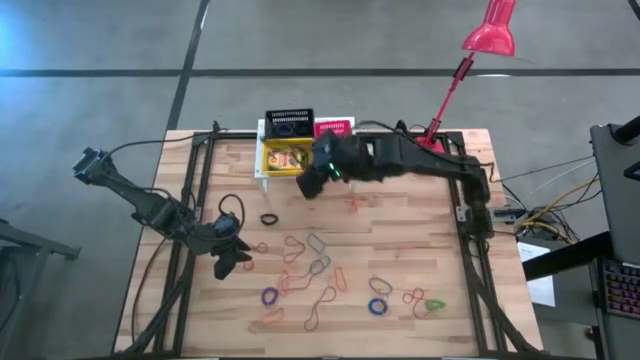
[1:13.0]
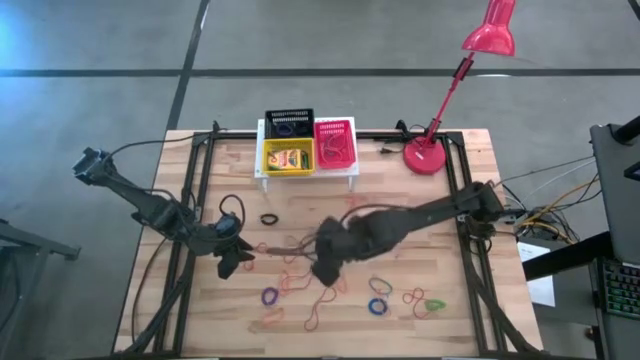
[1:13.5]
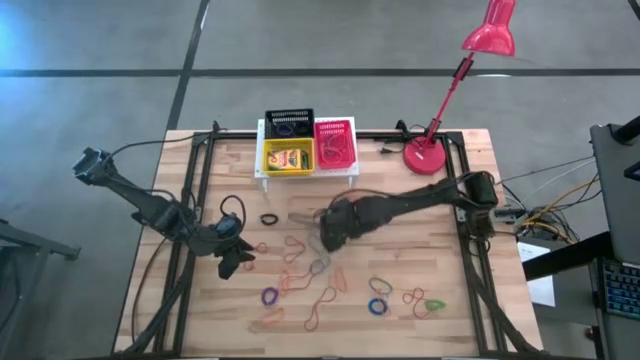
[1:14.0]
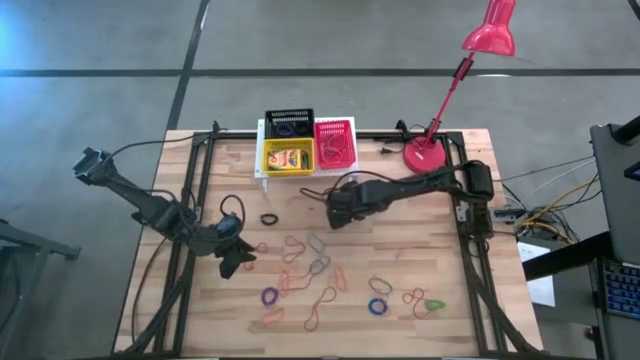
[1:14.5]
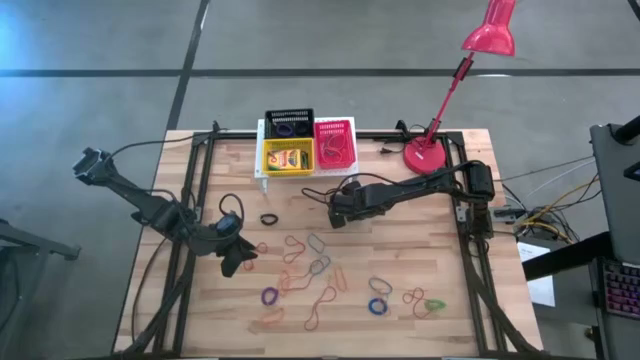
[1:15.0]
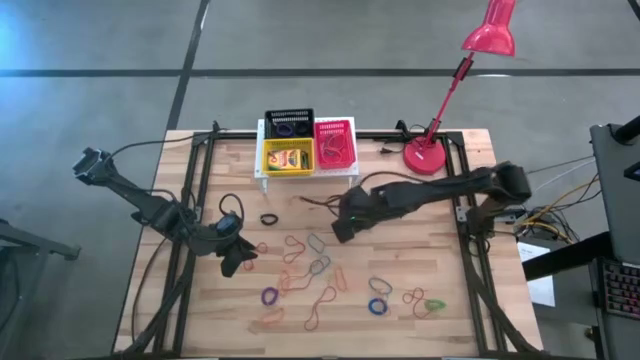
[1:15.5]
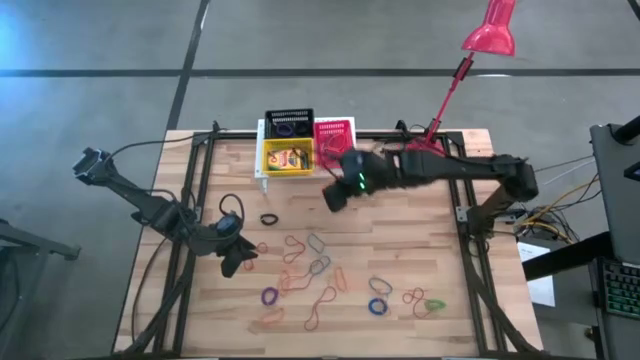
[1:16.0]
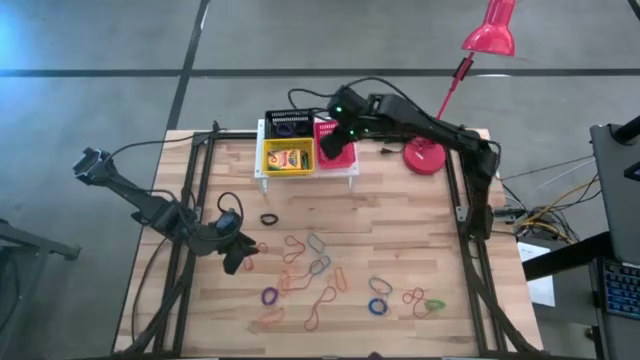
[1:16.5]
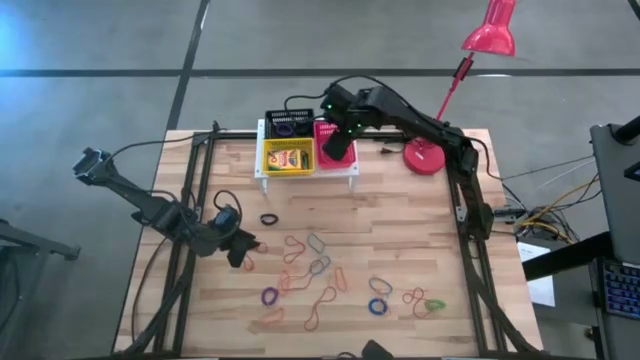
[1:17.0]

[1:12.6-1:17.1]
Task: Pick & Place Office Desk Supplies
Put the orange rubber band into the red basket on the shelf

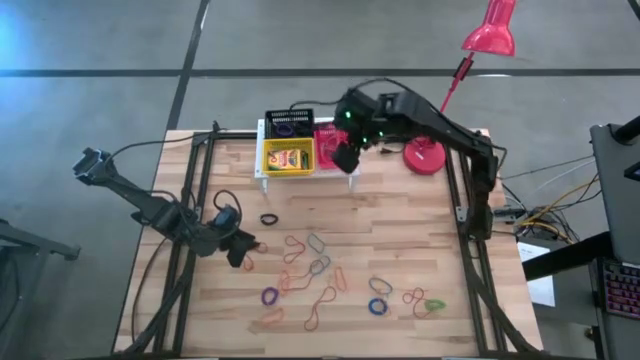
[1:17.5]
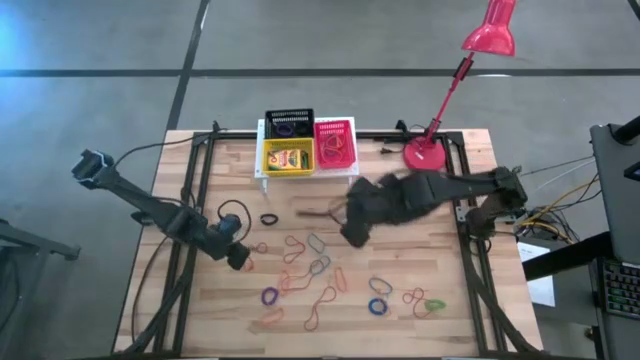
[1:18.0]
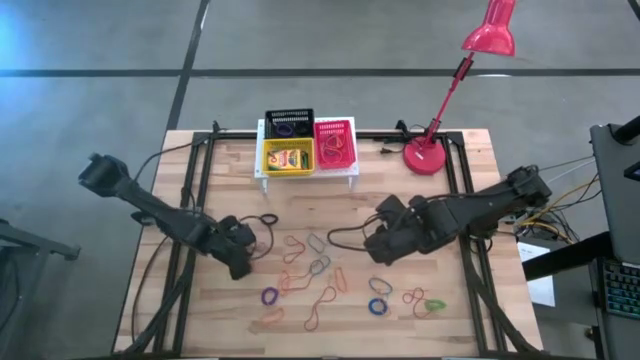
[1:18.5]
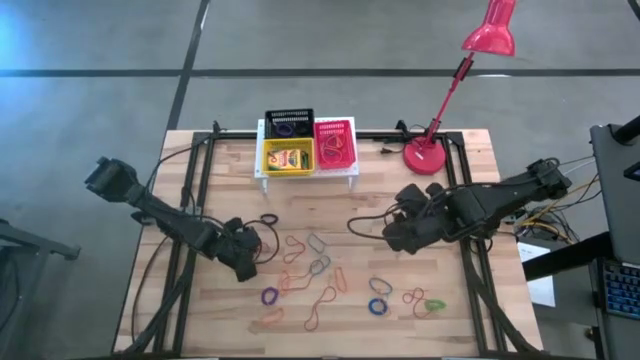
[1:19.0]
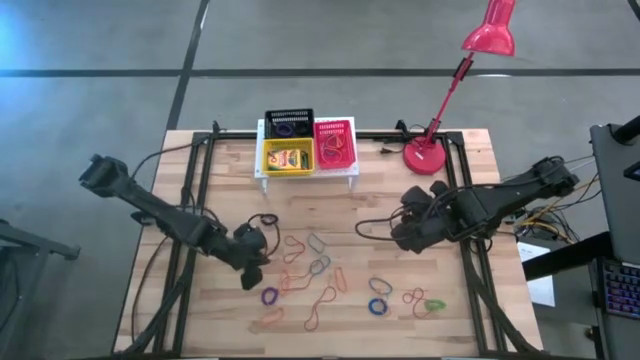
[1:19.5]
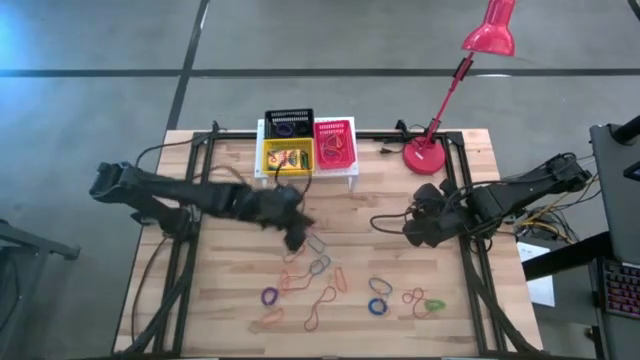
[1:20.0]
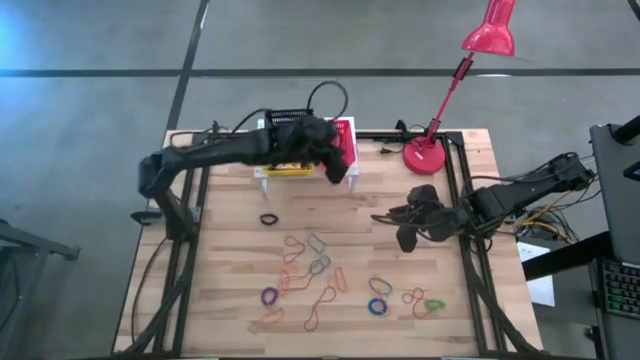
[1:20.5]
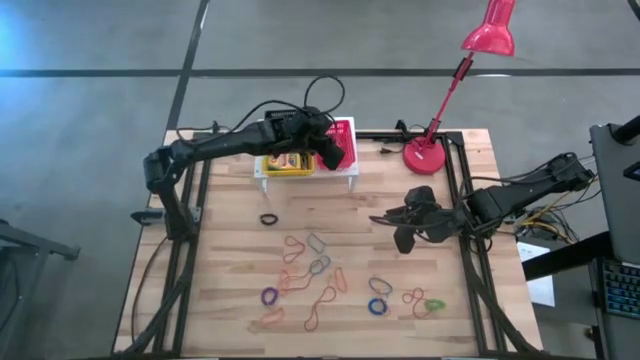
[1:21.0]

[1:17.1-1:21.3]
Put the red rubber band into the red basket on the shelf

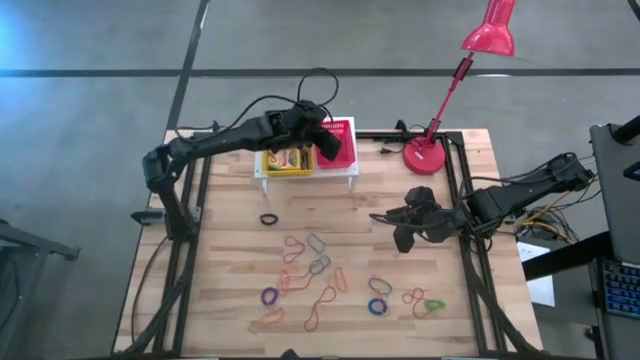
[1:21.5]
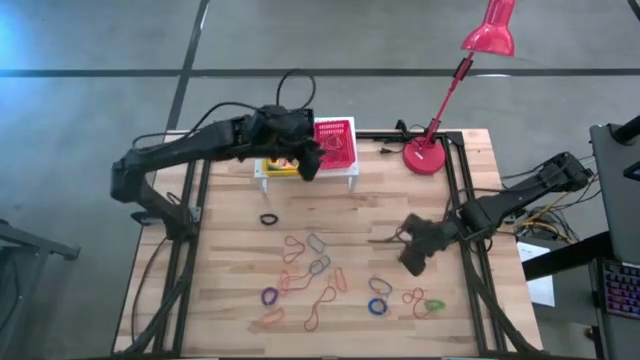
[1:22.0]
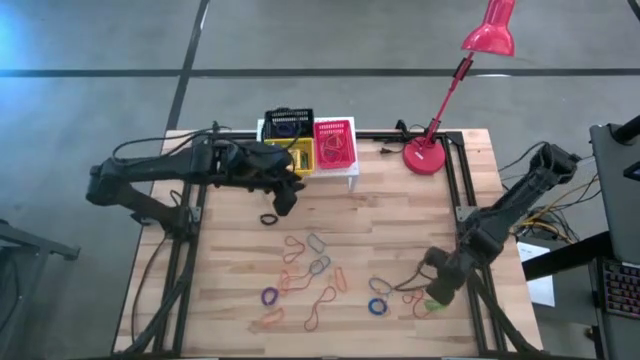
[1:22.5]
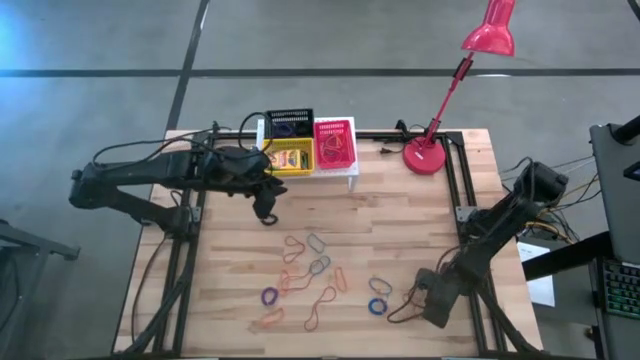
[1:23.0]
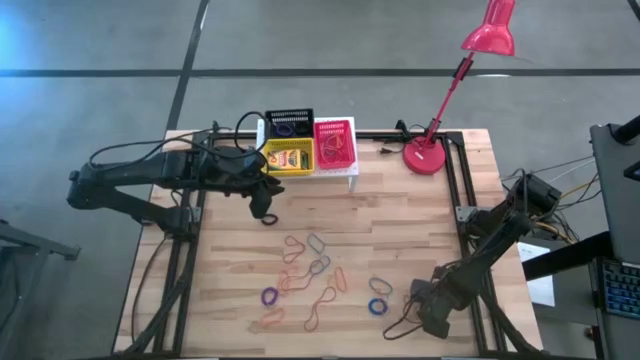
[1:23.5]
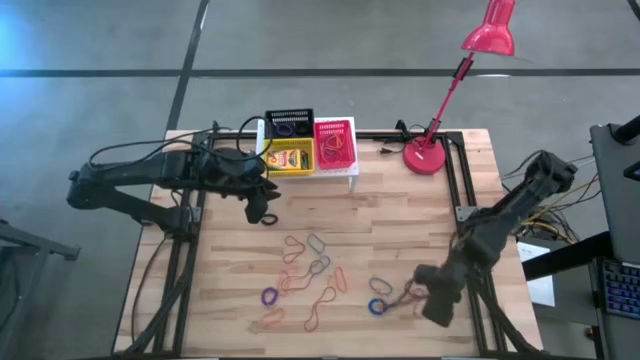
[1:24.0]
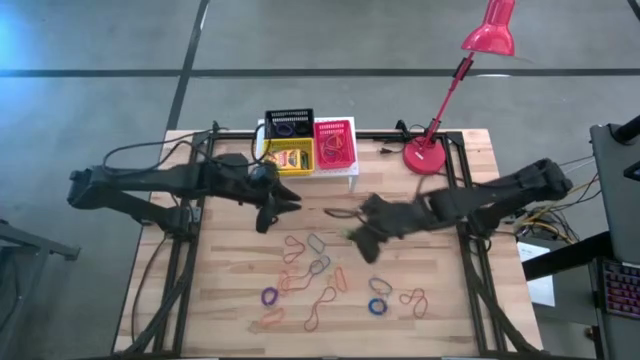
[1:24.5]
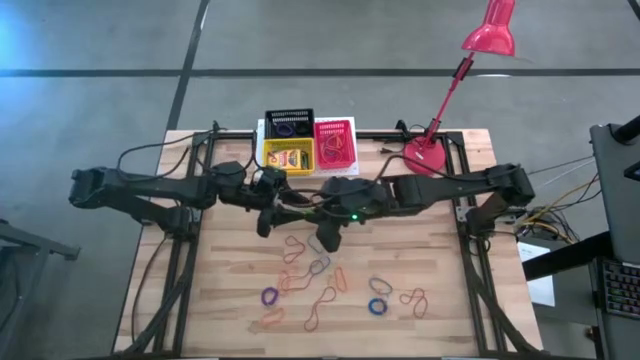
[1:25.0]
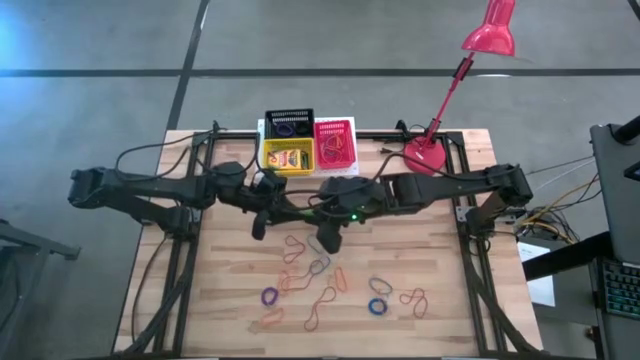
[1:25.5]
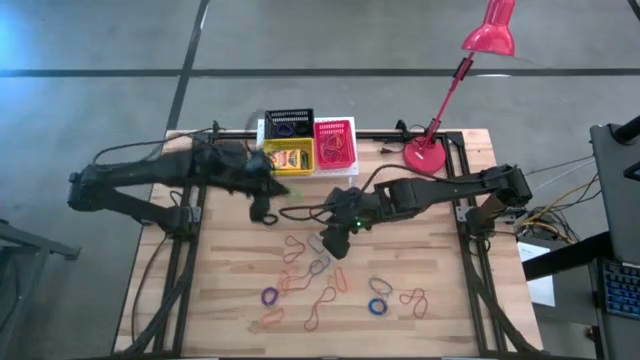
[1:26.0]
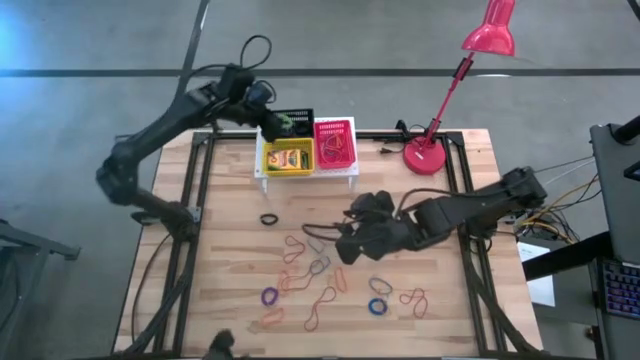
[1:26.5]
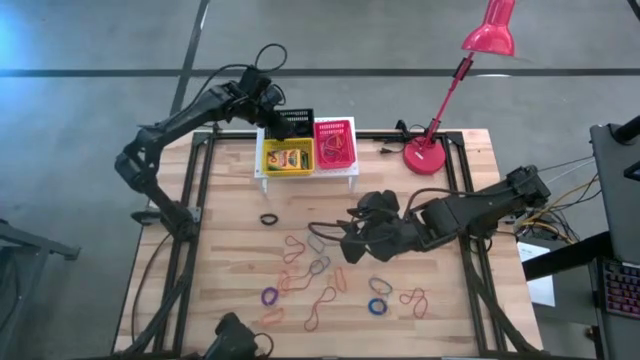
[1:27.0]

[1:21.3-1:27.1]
Put the green spring keychain into the black basket on the shelf

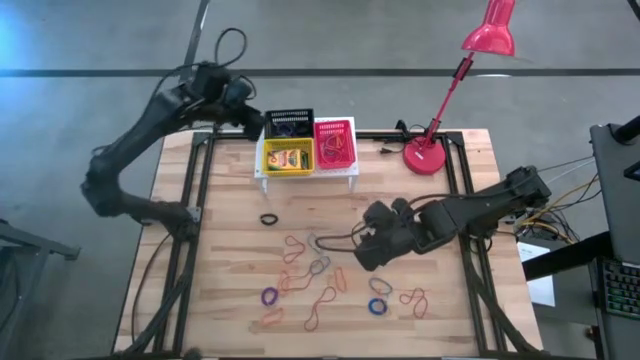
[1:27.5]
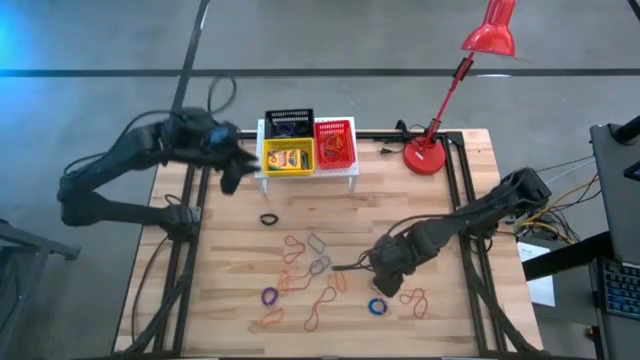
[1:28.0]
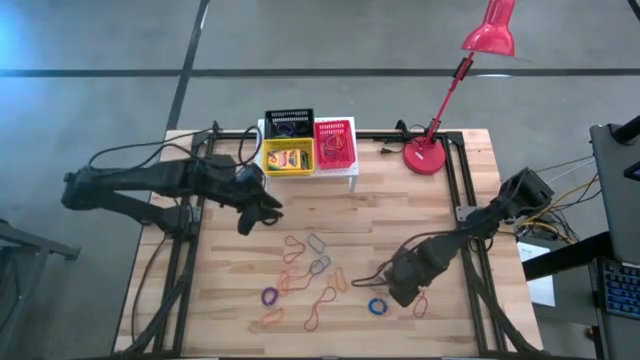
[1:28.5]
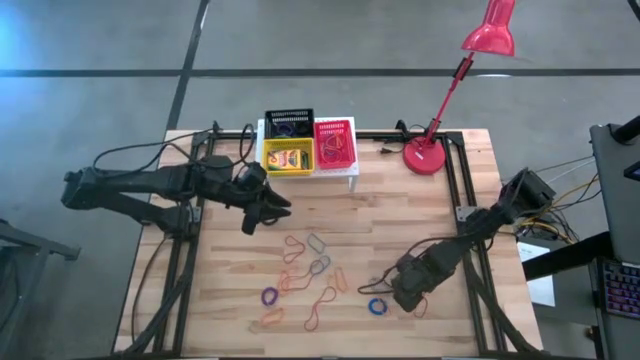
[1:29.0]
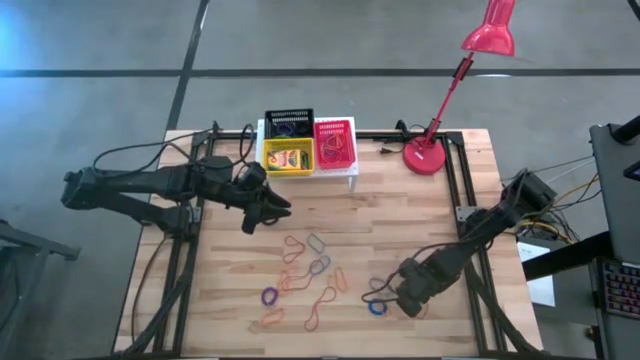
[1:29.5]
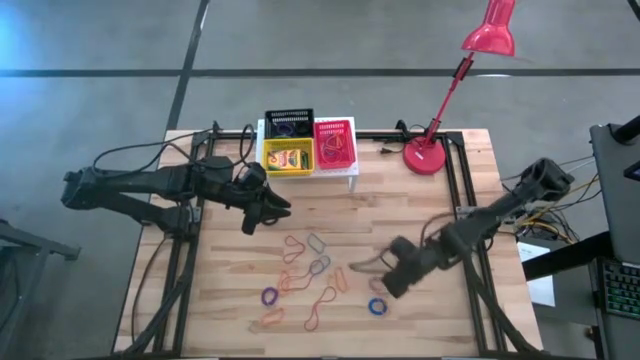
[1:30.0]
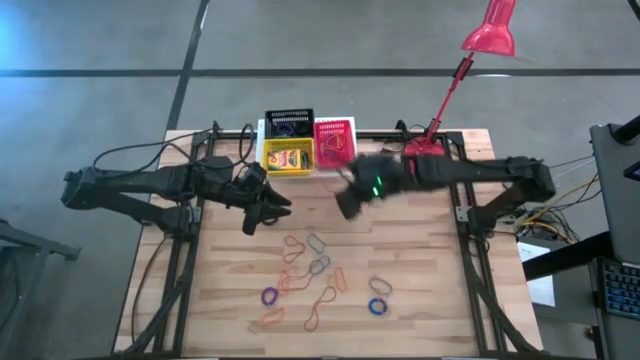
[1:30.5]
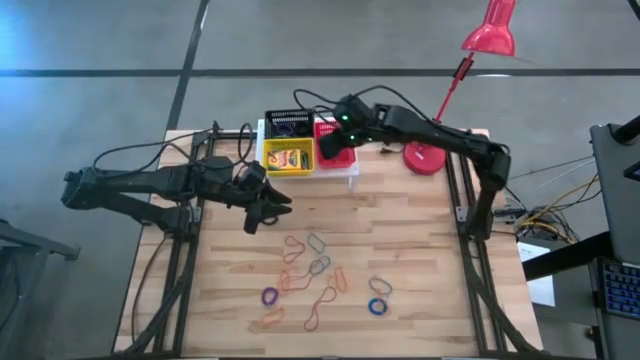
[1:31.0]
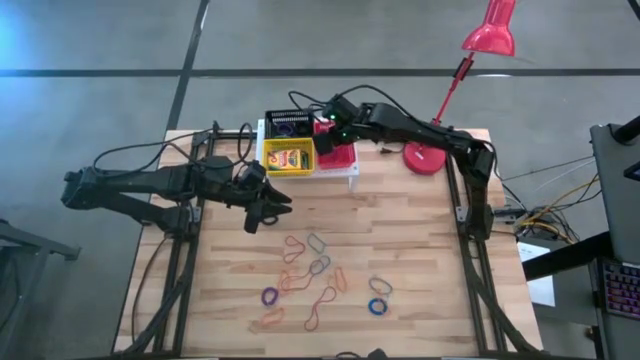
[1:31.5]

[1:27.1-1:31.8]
Put the red rubber band into the red basket on the shelf

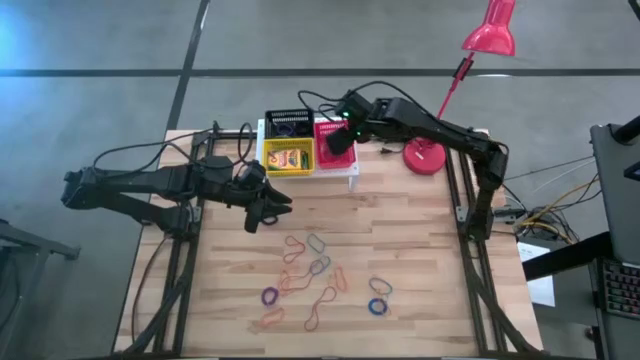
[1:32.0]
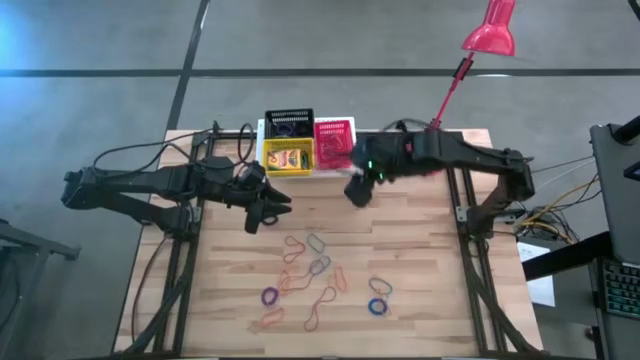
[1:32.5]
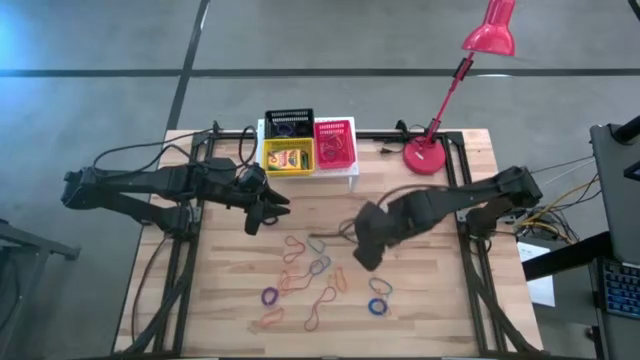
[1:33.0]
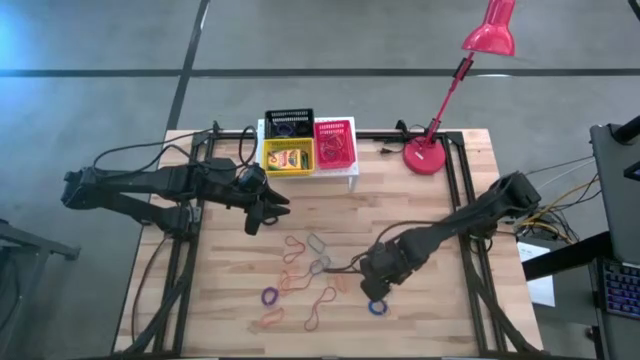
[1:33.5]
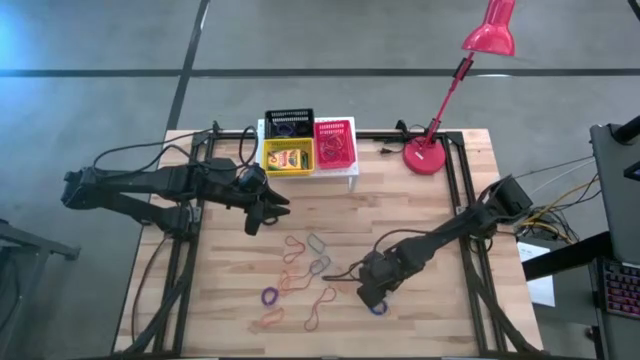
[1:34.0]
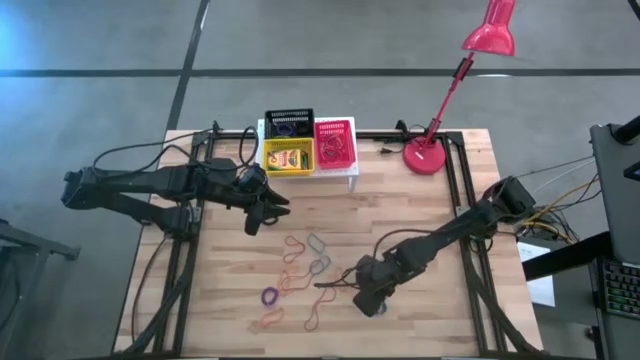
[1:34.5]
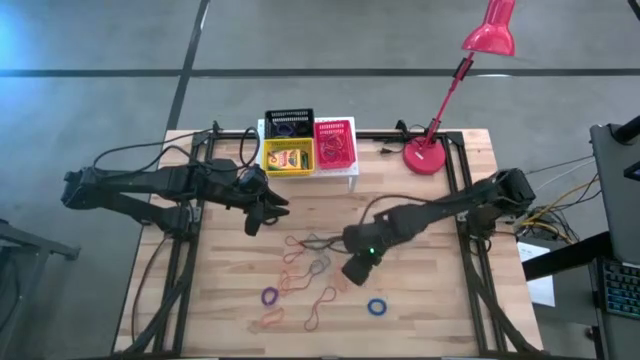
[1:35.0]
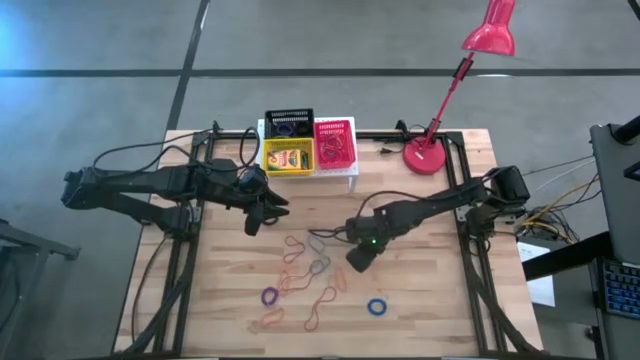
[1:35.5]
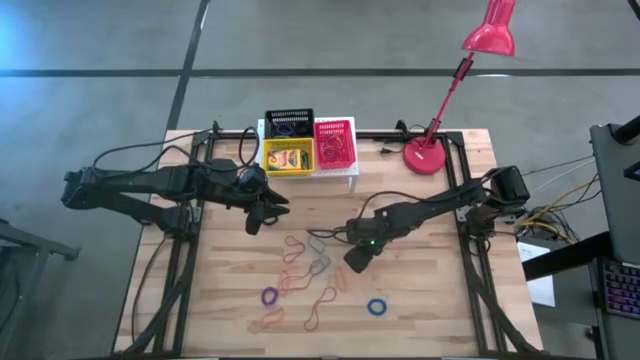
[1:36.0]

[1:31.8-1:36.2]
Put the orange rubber band into the red basket on the shelf
